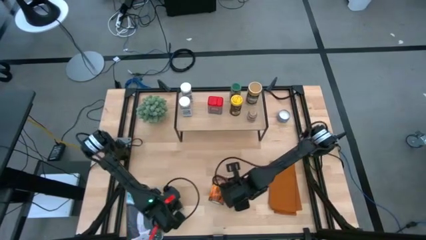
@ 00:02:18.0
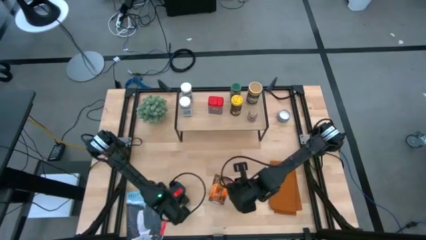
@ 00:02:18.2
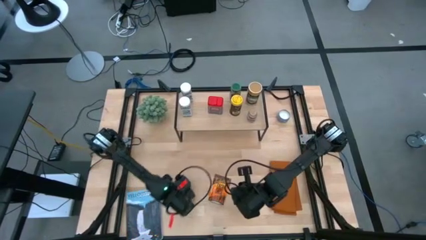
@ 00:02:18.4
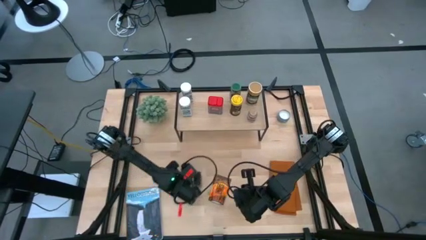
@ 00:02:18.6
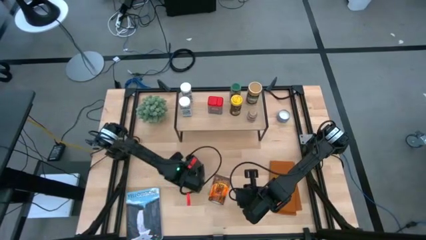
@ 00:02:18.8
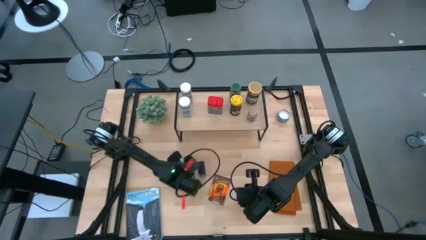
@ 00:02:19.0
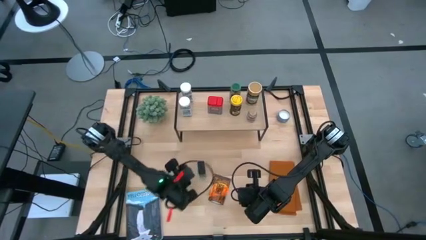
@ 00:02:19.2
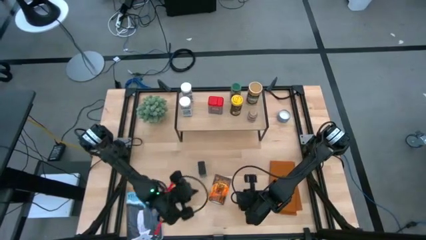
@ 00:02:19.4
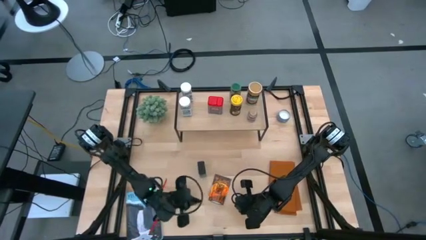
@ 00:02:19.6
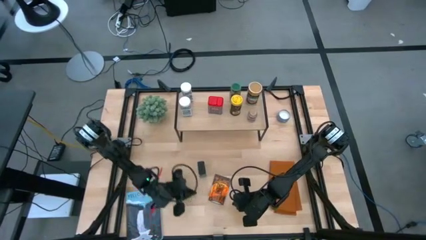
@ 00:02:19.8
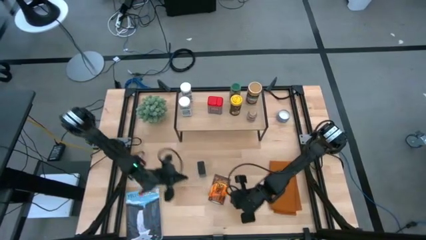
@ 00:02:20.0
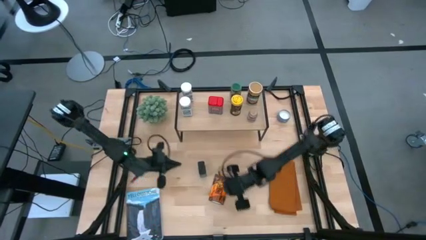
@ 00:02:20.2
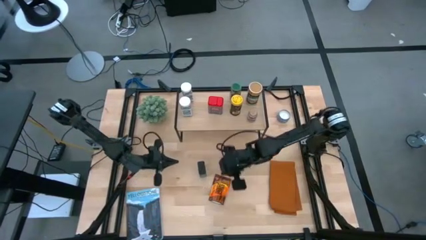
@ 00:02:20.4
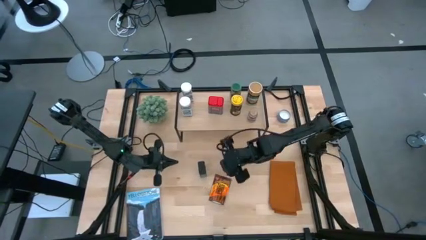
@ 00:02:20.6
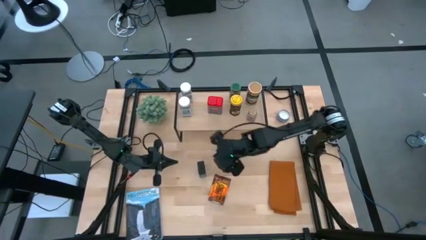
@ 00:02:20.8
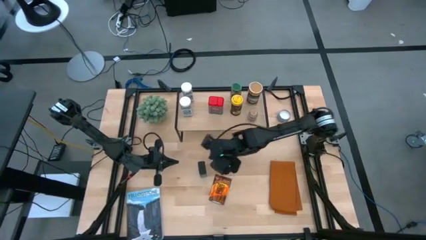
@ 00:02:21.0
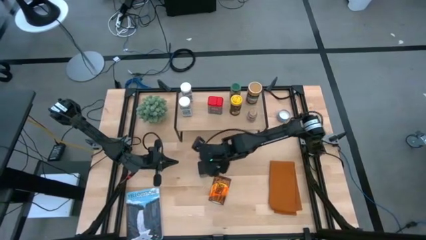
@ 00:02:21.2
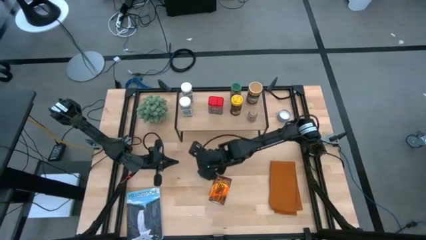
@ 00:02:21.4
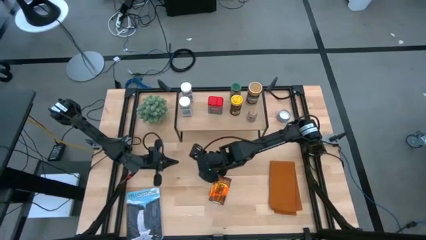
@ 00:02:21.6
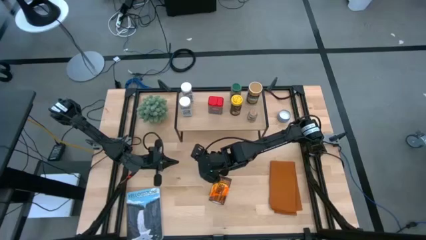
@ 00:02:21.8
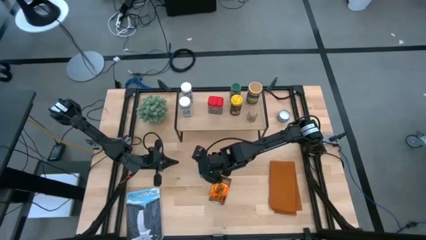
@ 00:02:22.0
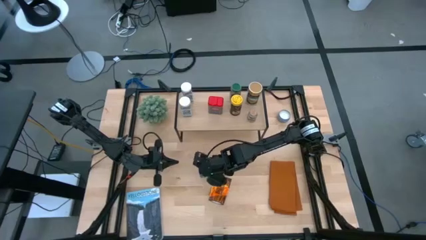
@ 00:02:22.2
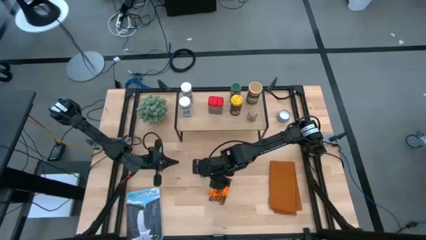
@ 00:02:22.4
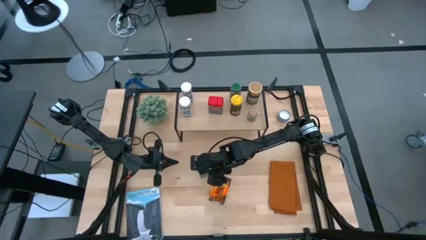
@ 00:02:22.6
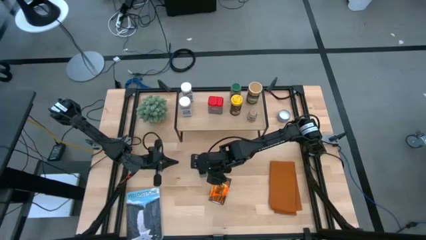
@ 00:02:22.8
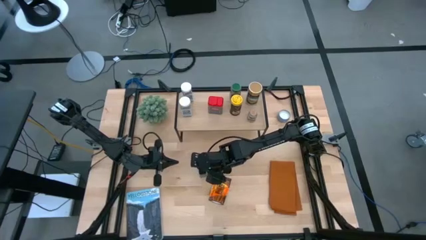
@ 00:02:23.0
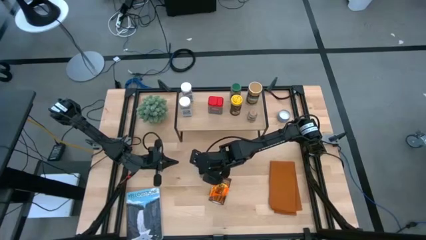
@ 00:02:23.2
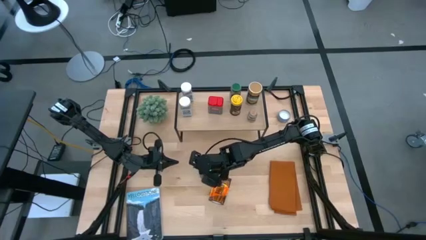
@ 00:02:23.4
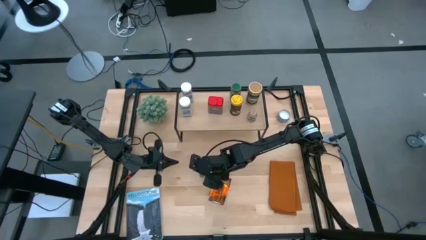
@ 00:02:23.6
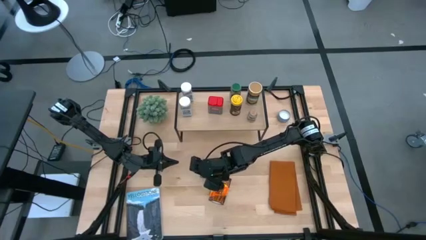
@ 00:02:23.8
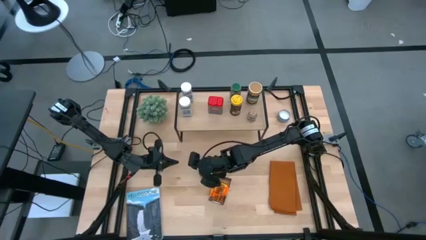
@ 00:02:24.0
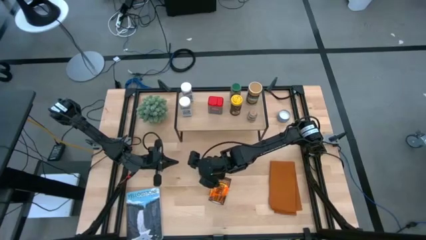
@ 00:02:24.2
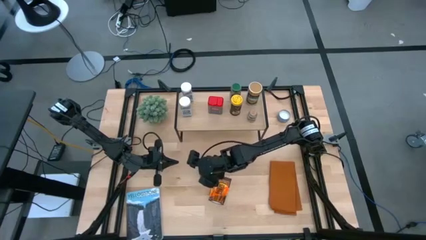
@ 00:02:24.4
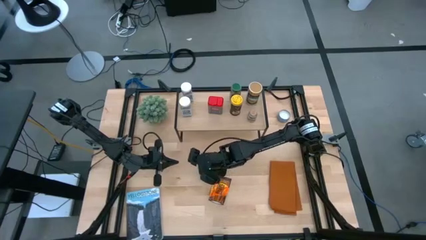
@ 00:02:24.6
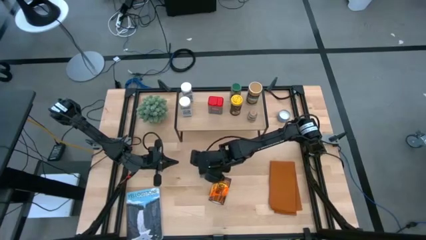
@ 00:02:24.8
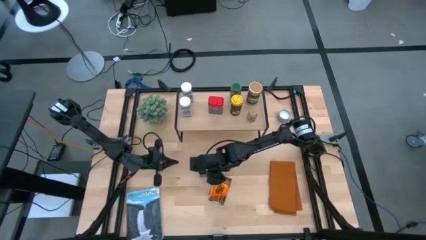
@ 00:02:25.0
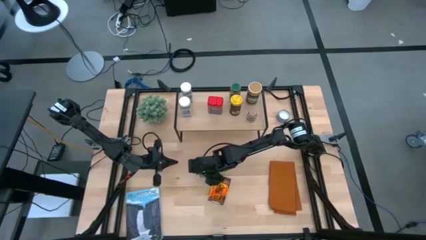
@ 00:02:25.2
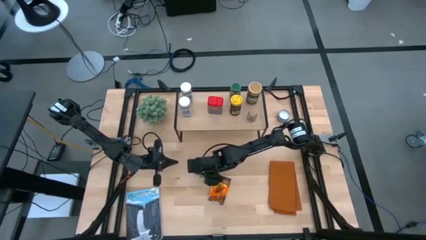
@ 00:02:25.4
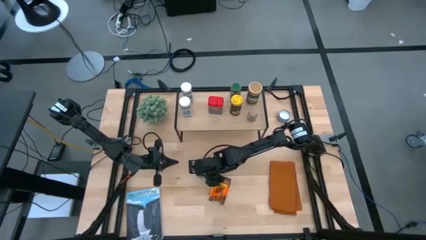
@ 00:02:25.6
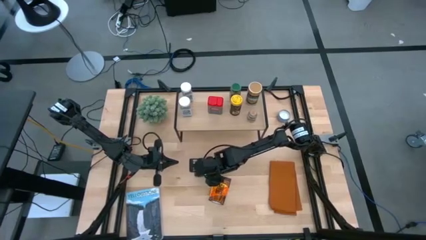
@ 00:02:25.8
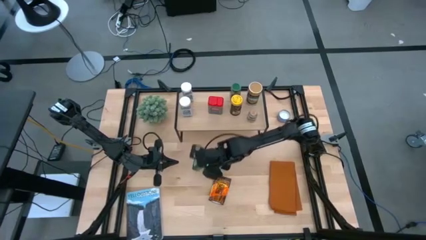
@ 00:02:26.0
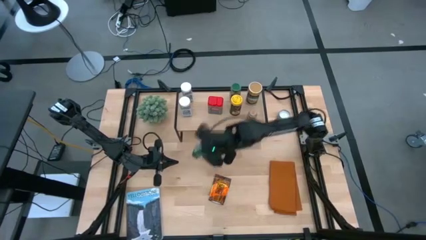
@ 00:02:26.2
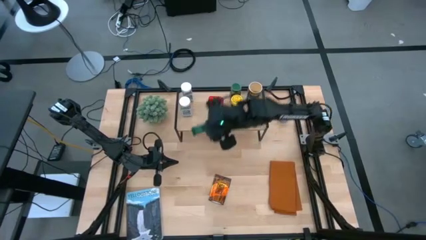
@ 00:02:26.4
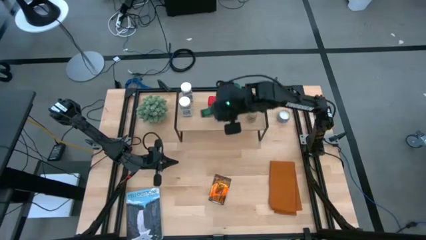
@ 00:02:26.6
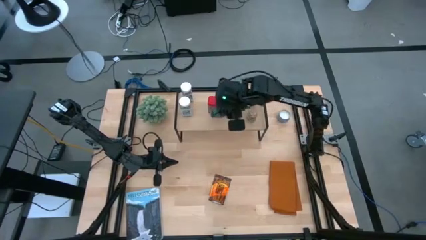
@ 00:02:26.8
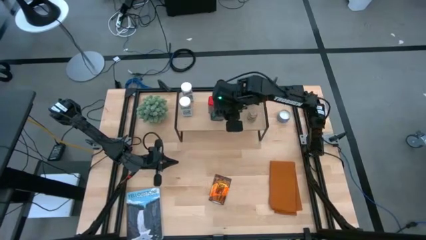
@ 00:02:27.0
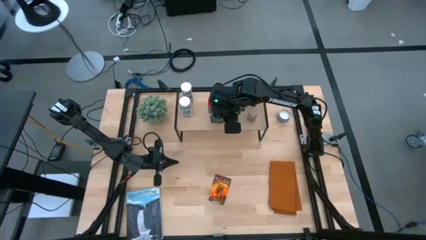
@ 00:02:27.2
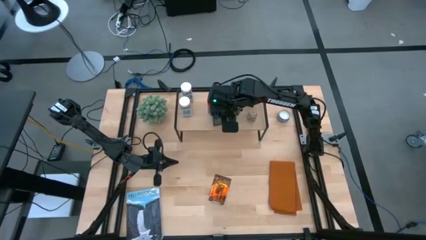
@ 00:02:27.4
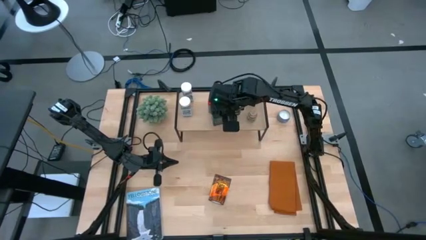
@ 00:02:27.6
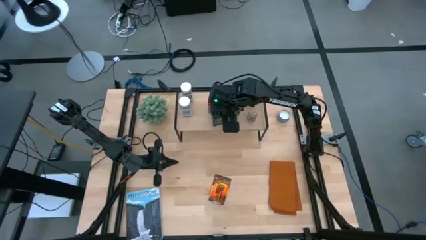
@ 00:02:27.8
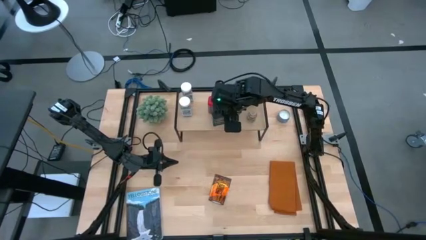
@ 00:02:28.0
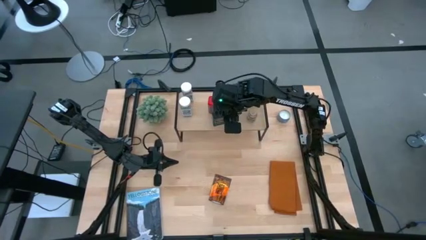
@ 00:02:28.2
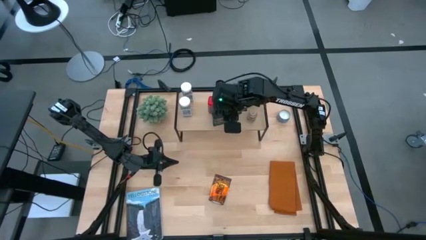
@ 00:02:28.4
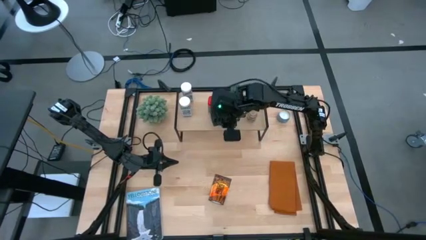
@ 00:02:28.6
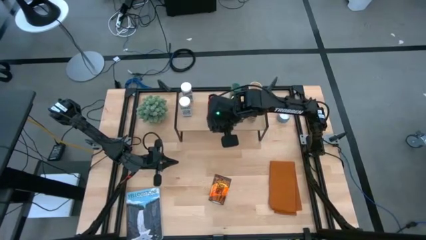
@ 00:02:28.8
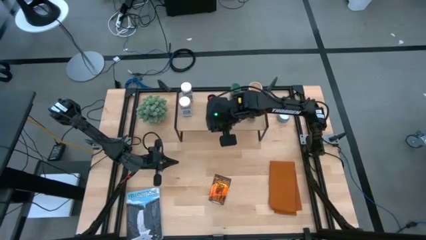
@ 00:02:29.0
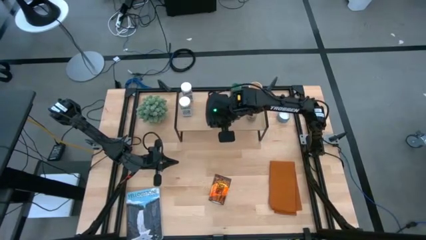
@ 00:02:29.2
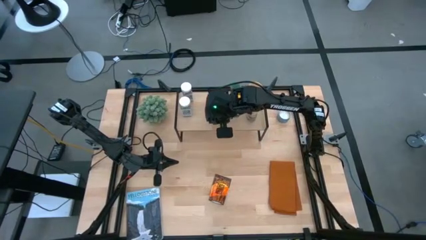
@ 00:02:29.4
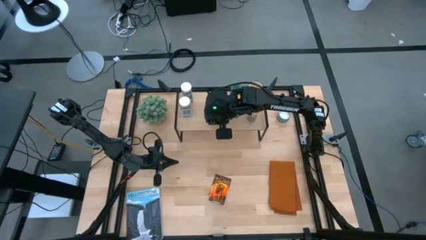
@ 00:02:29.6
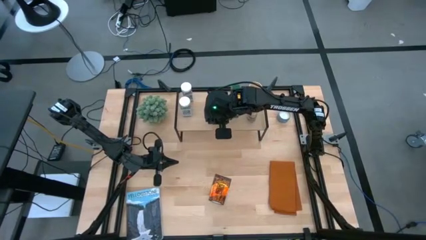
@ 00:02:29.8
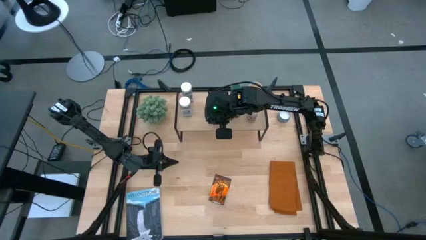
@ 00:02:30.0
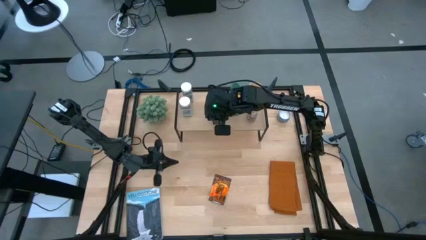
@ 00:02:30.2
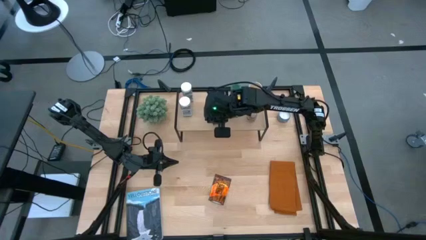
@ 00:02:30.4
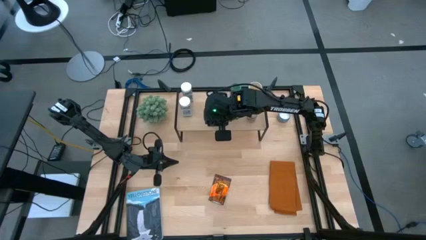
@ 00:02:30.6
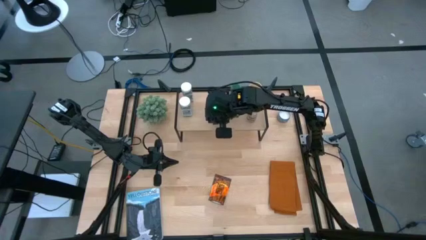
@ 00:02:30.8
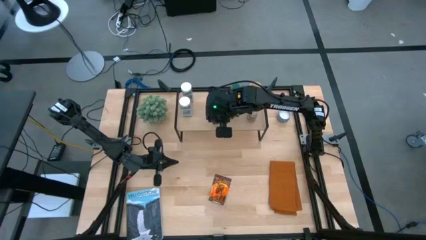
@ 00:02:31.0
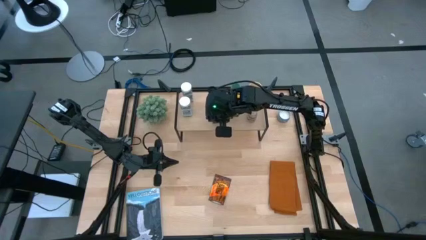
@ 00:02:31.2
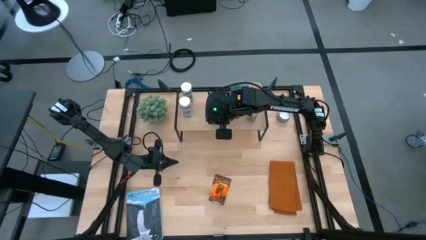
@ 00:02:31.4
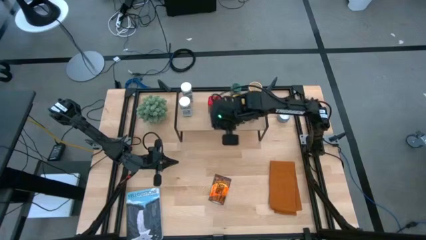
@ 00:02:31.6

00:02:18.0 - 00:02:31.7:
Task: Shelf spices
Put the green seasoning can onto the shelf
